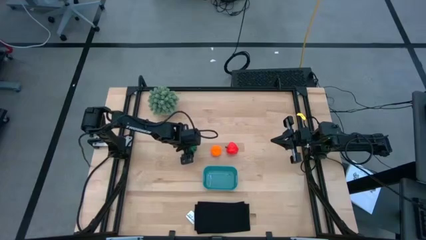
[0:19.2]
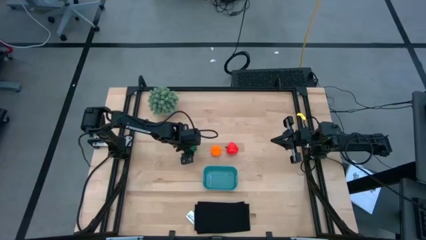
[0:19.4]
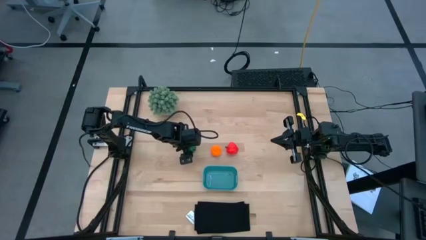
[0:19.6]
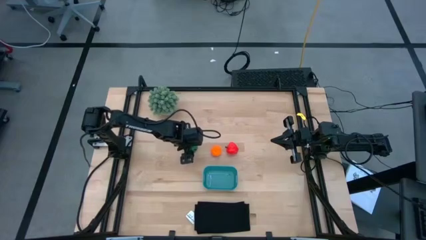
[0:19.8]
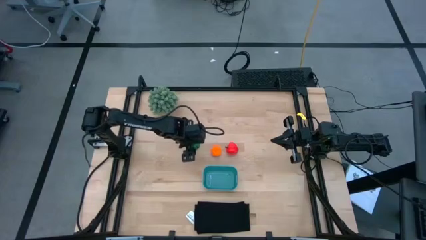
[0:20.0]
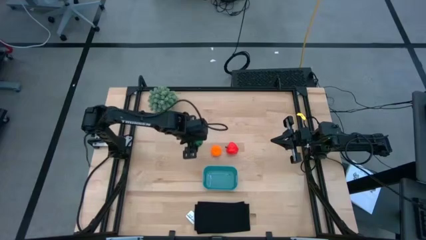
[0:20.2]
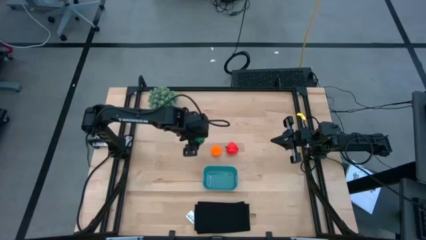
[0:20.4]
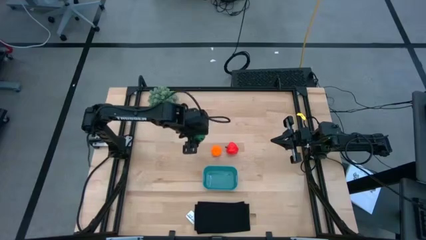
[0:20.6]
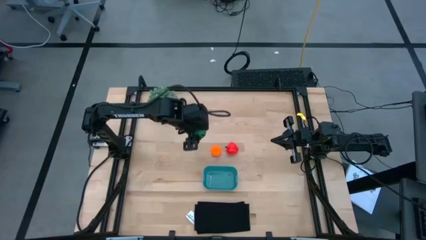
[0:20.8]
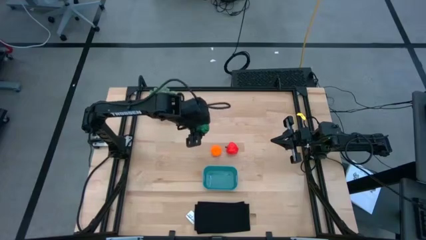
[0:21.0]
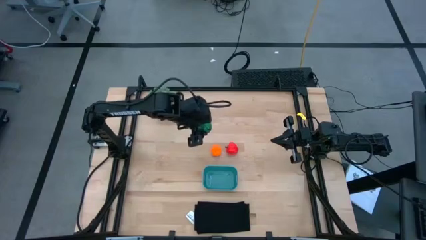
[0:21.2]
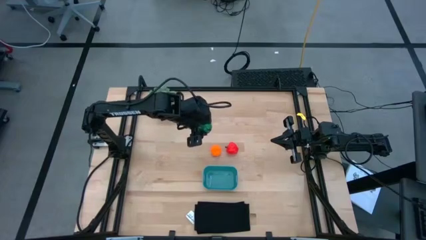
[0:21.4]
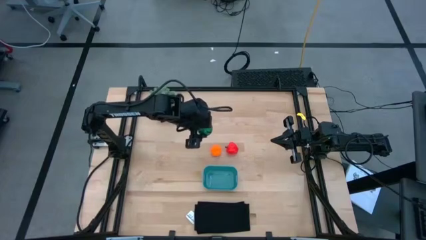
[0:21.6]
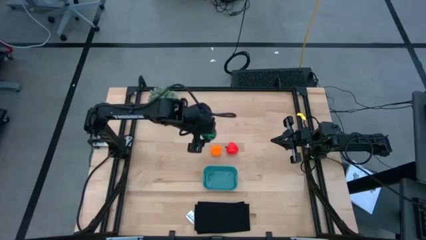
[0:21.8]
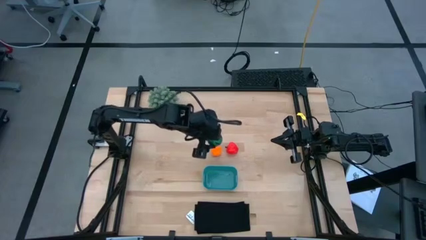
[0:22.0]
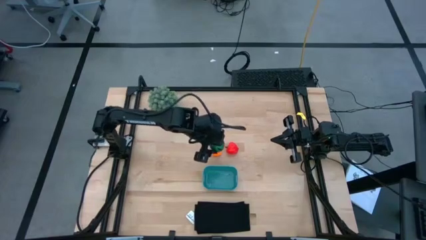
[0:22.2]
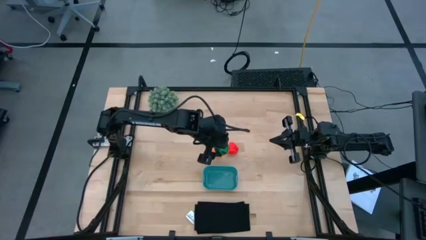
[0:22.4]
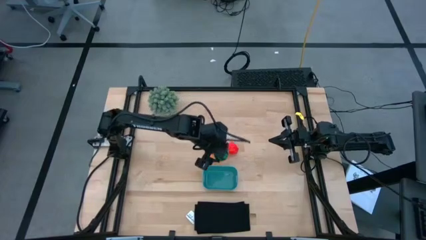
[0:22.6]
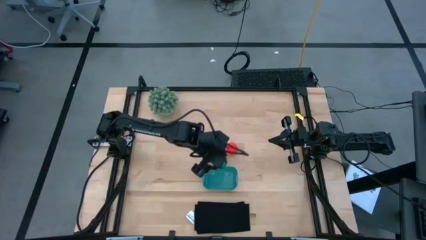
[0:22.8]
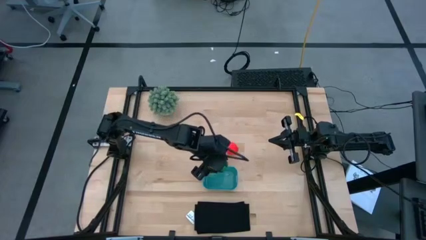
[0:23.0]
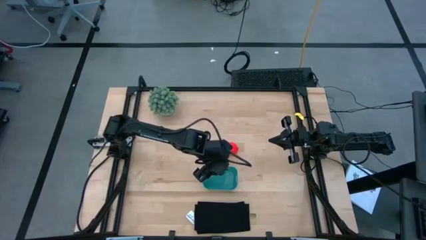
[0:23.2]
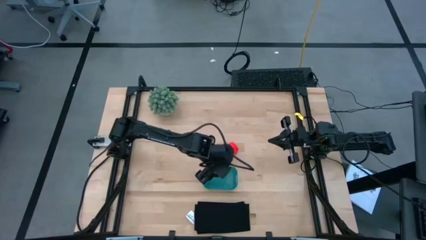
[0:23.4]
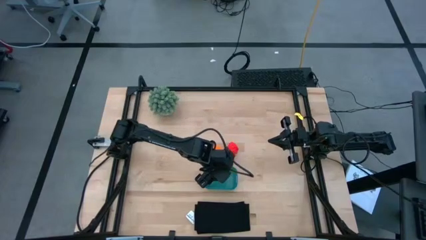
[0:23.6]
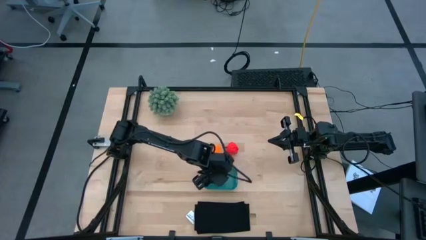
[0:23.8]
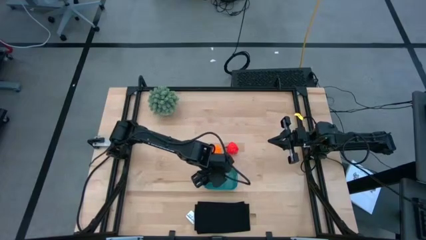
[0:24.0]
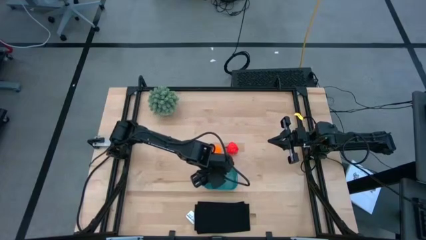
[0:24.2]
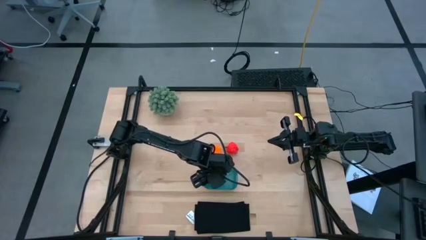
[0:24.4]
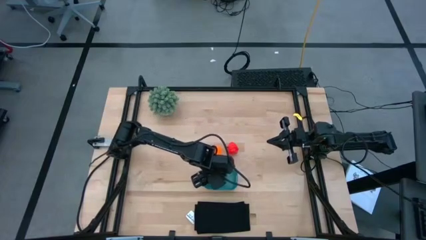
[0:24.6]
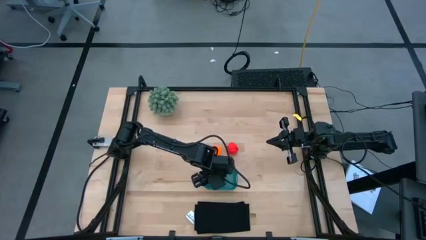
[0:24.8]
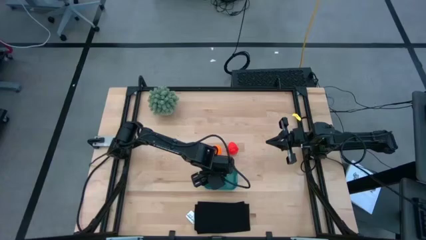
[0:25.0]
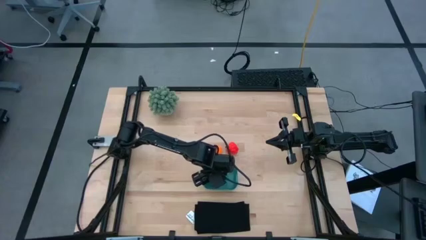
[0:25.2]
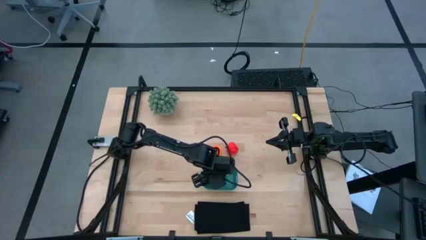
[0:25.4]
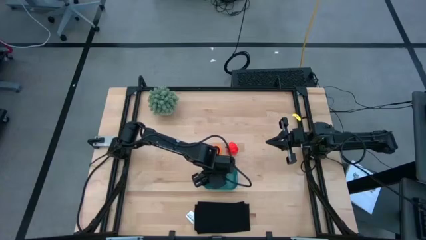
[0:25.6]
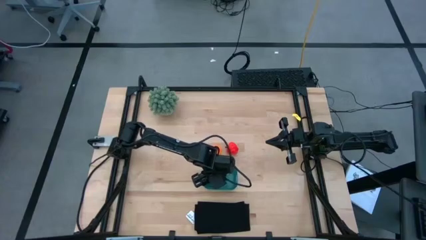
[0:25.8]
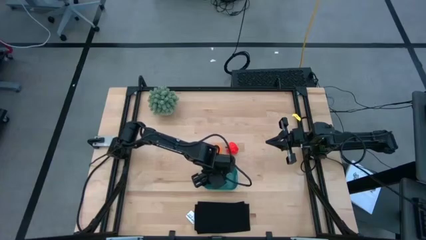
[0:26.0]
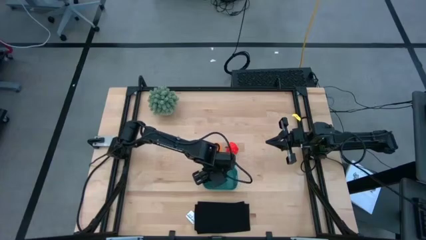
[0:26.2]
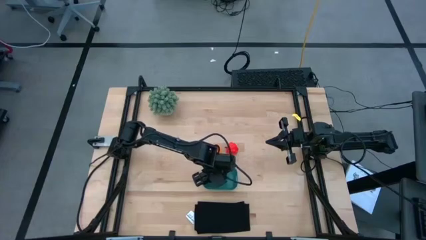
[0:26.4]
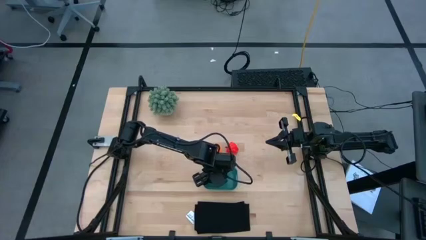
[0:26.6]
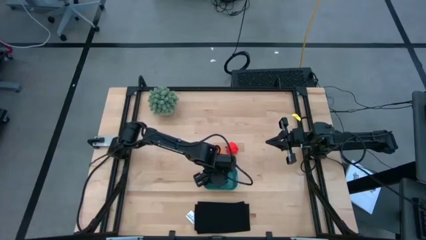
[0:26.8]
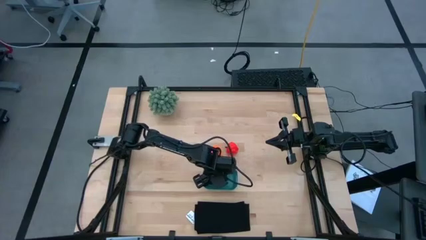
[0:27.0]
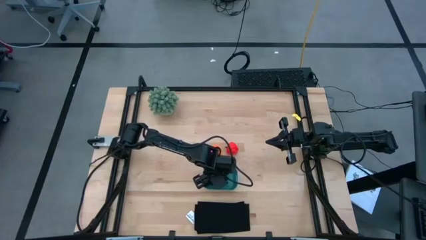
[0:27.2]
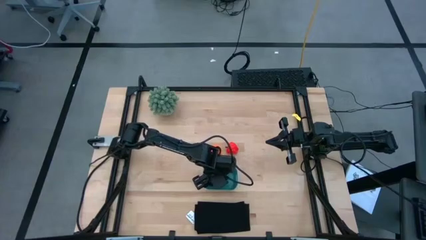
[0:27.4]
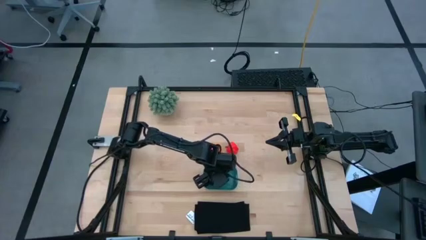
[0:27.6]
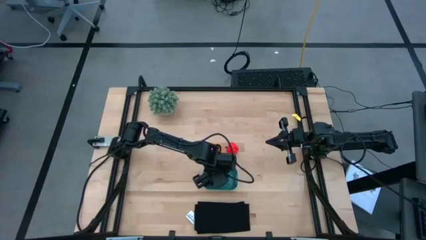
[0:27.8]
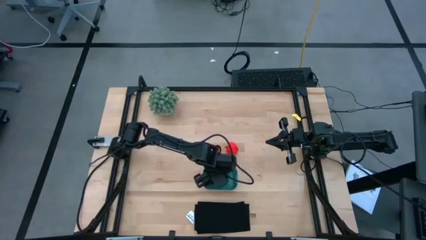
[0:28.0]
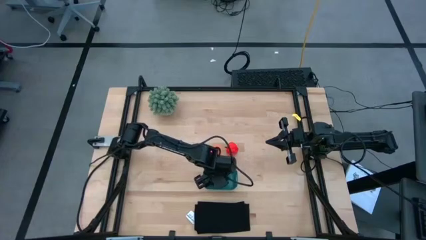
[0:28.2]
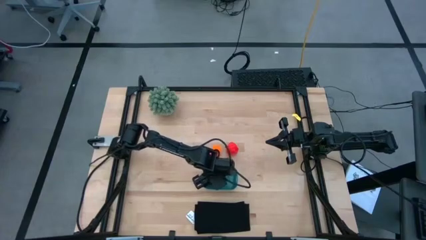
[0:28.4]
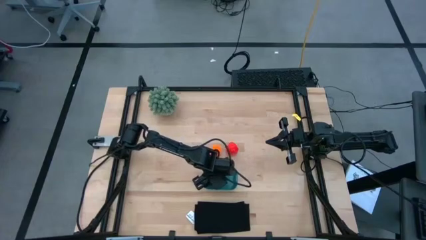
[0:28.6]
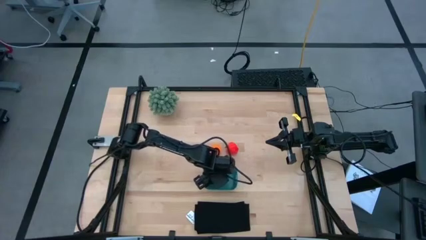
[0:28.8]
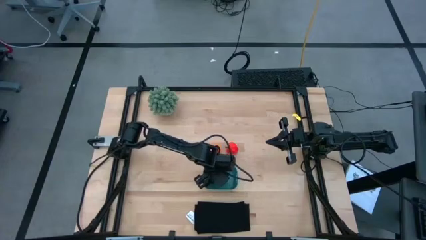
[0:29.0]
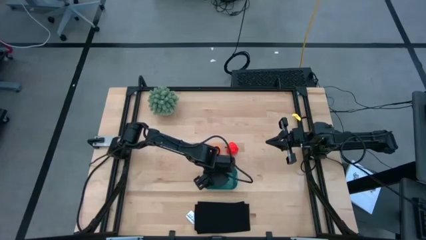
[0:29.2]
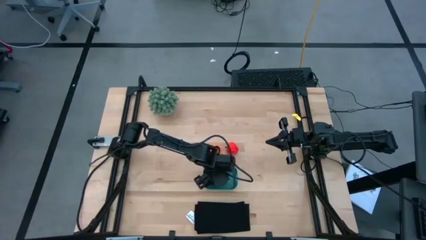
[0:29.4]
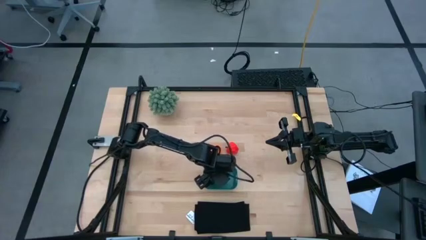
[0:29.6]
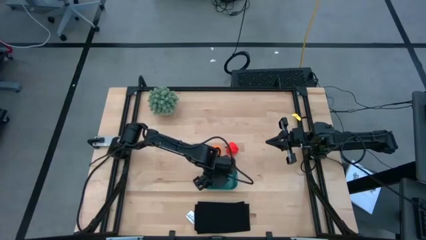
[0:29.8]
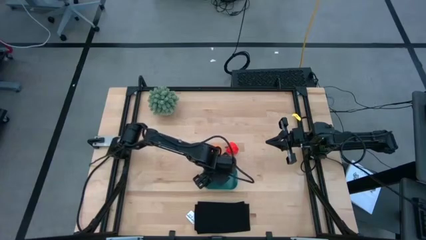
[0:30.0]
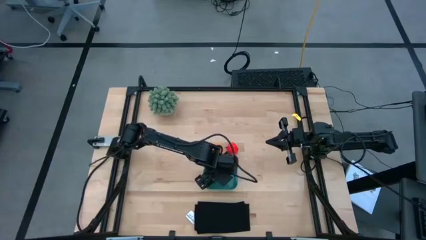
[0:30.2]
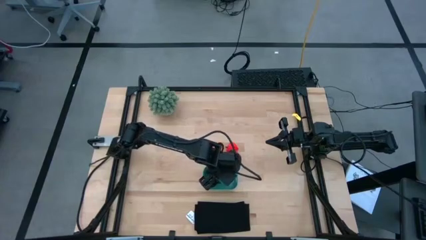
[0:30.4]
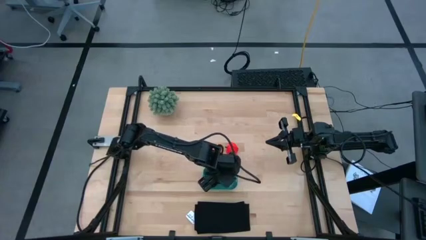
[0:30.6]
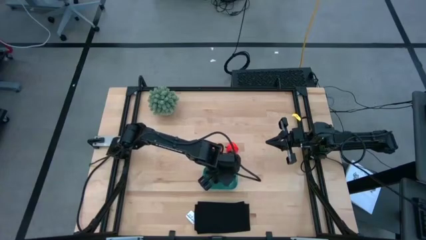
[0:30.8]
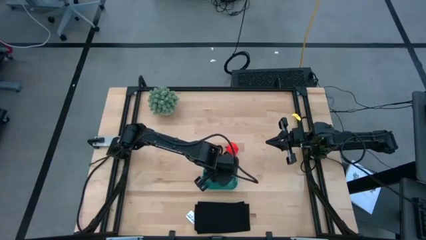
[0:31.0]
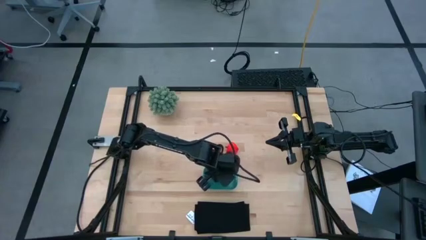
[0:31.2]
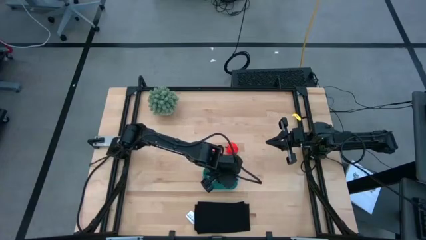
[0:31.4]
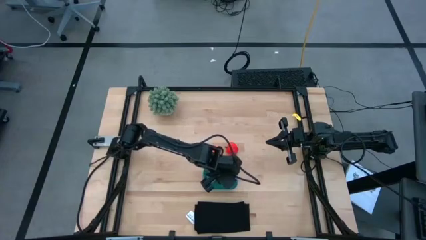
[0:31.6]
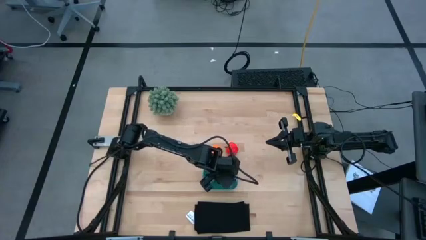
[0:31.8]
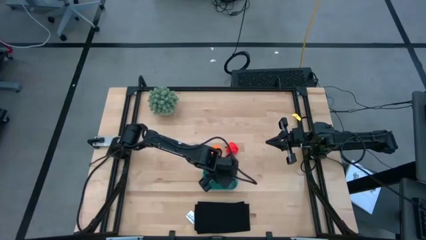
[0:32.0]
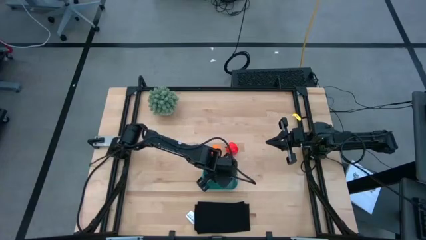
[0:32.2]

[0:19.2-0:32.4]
Task: Pick and placing Produce into tupperware
Put the watermelon into the blue bin

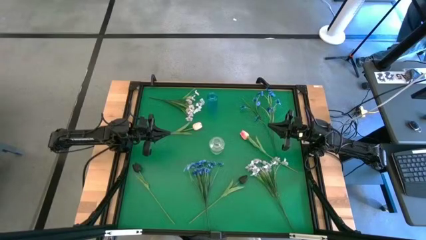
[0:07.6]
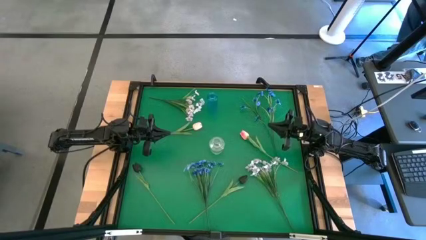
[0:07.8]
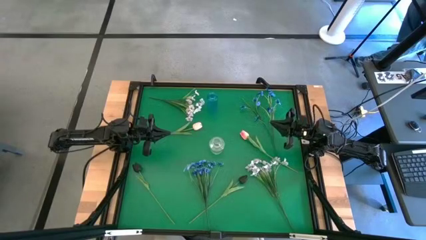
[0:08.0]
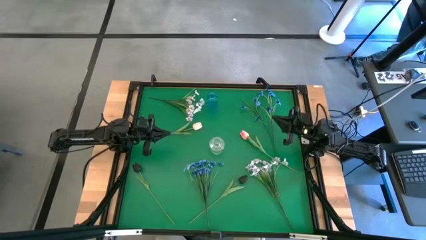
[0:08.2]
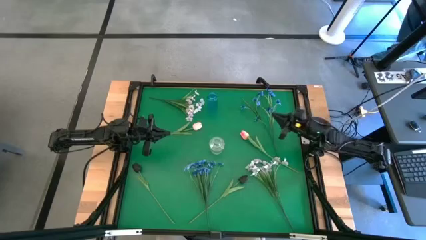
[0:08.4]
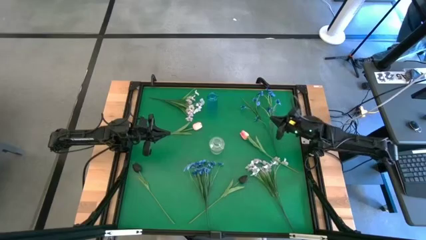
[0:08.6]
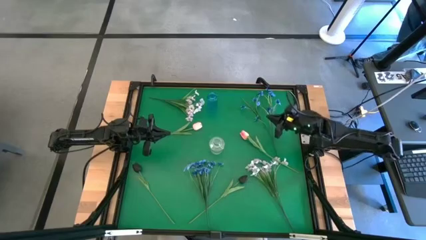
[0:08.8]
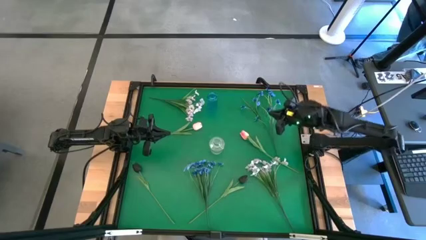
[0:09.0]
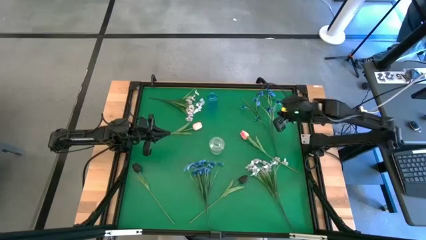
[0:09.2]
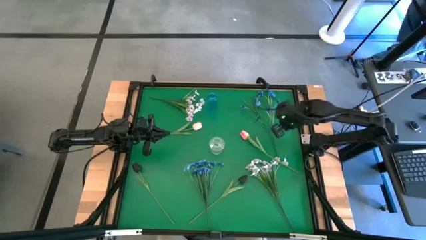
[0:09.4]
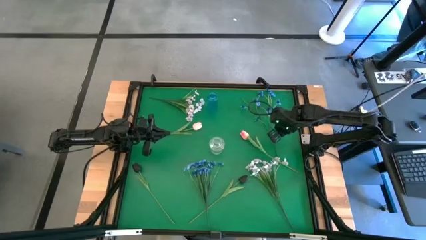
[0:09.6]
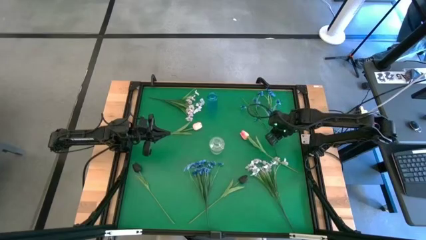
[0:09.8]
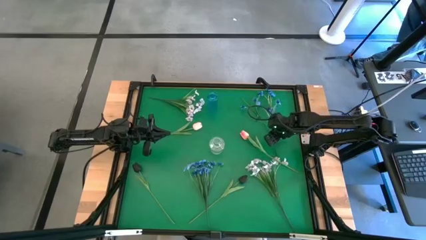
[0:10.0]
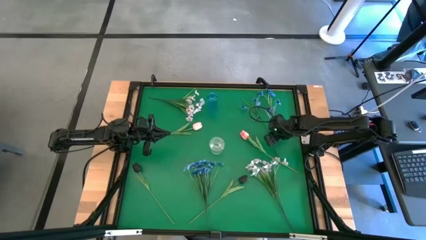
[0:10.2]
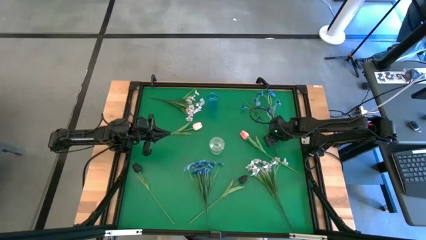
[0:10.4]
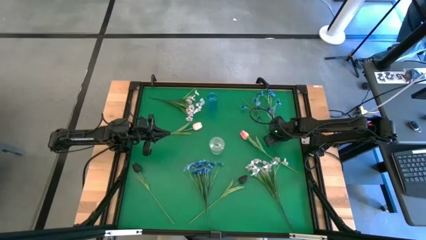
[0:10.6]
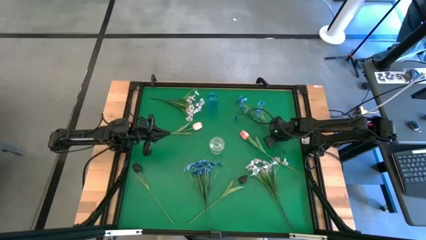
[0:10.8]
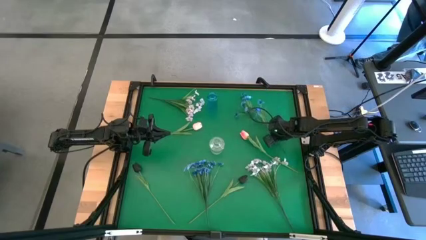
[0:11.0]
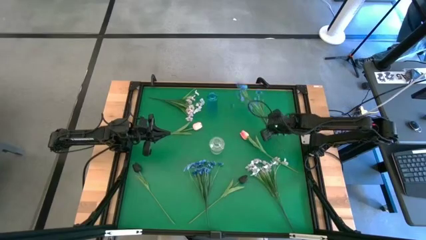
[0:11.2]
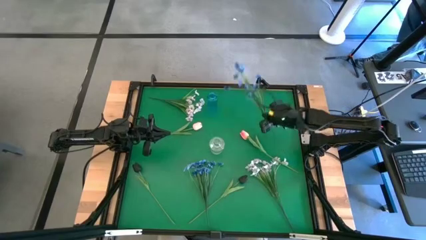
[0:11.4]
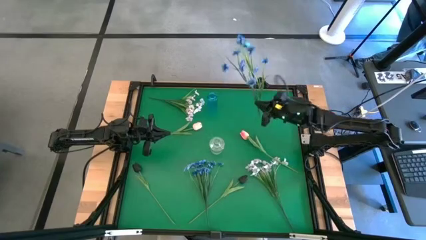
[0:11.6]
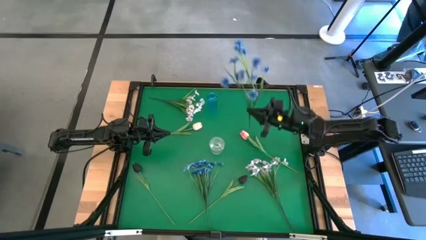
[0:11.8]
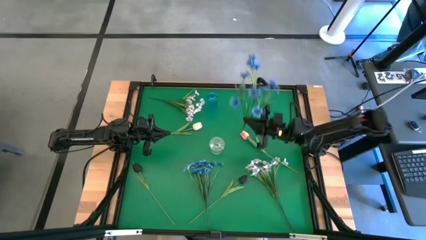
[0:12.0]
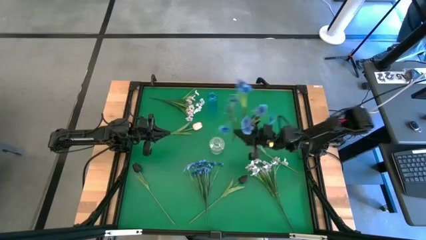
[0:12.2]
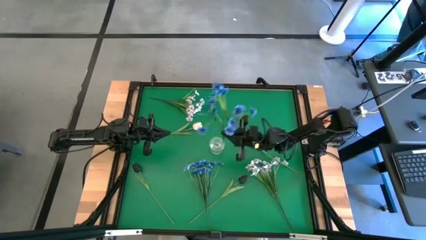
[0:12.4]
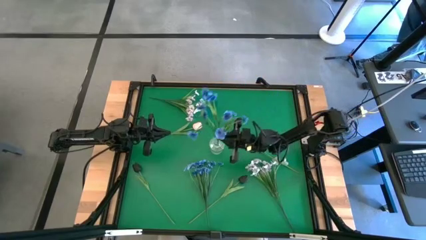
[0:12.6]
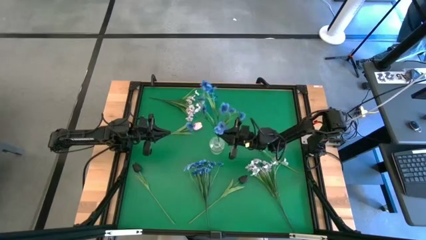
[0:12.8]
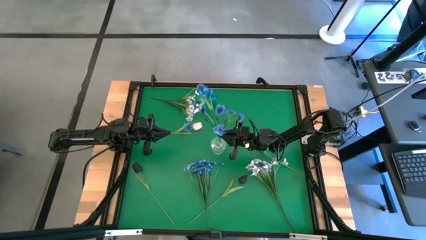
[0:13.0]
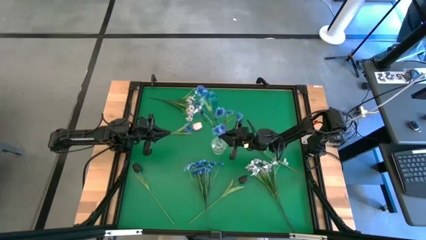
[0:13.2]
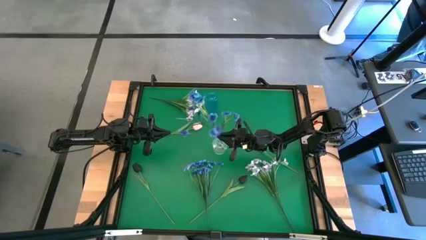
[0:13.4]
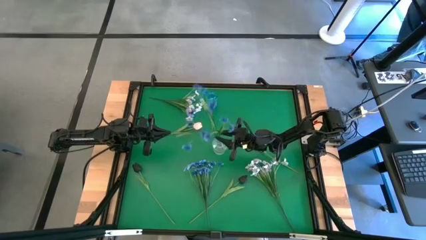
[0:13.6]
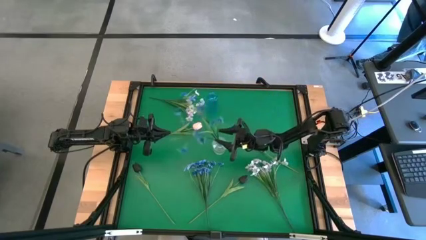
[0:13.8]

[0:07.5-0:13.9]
Task: Sort flowers into vase by color
Put the top blue flowers into the transparent vase
